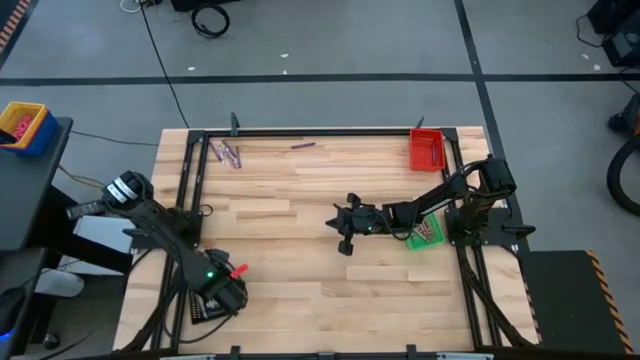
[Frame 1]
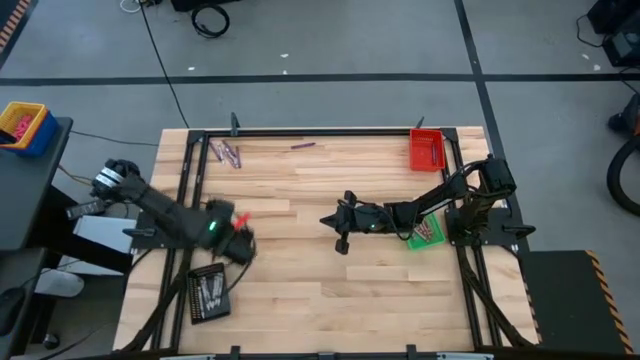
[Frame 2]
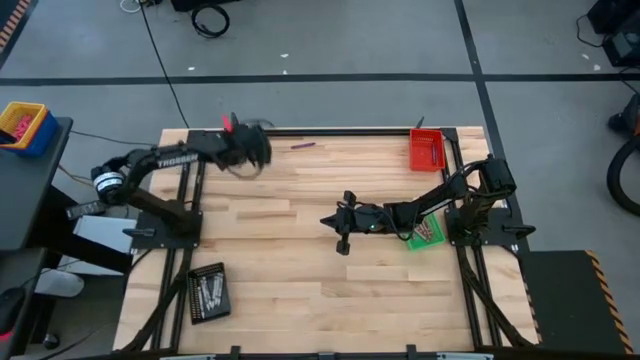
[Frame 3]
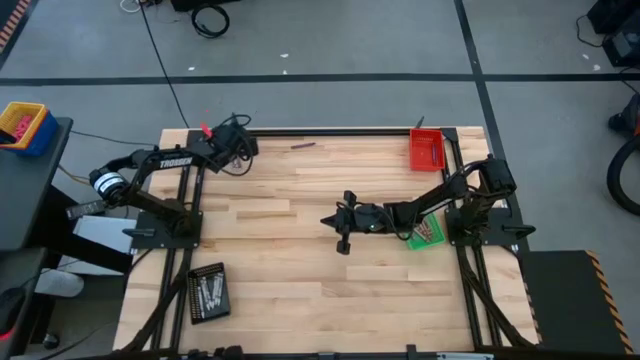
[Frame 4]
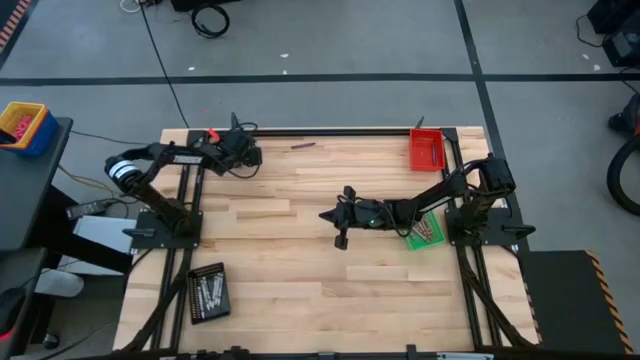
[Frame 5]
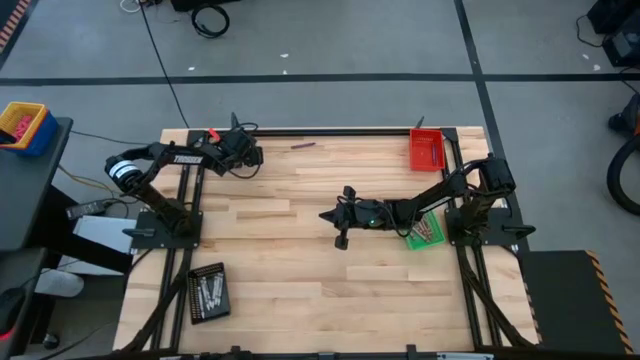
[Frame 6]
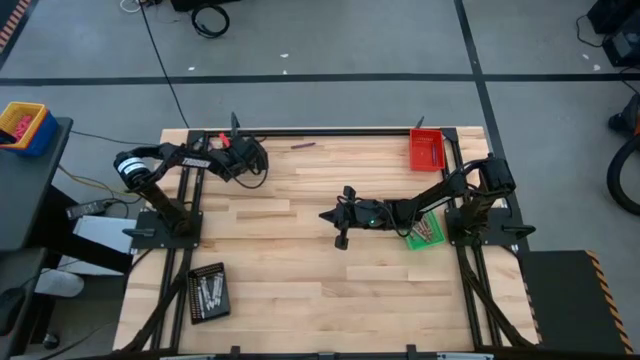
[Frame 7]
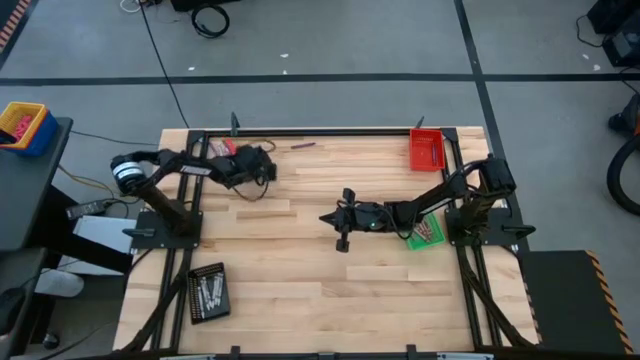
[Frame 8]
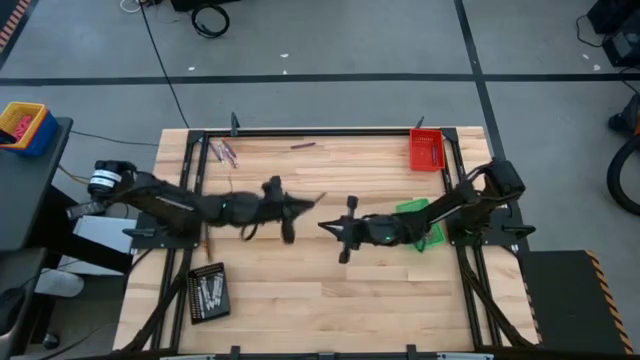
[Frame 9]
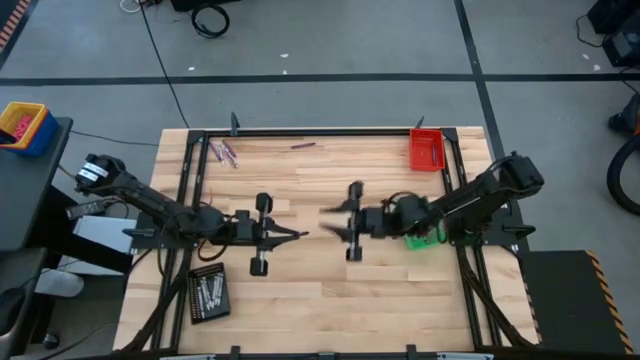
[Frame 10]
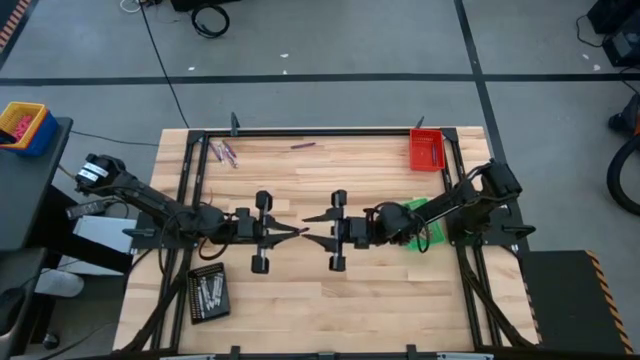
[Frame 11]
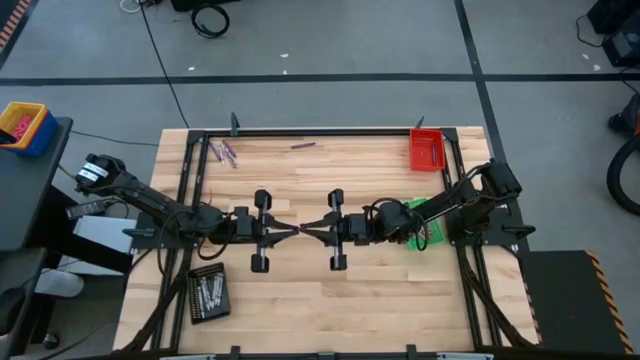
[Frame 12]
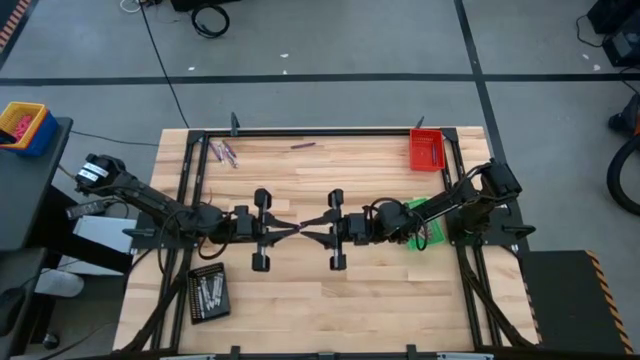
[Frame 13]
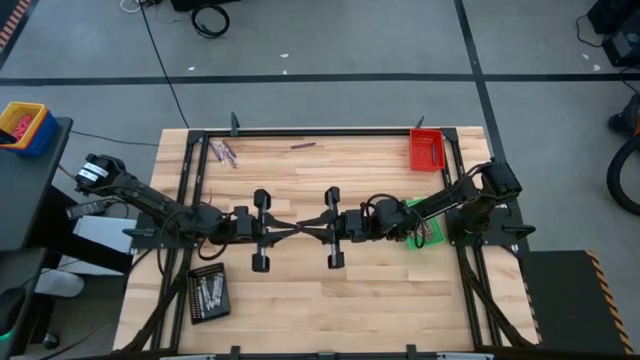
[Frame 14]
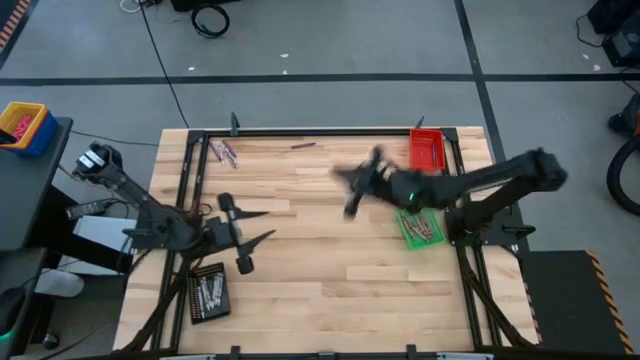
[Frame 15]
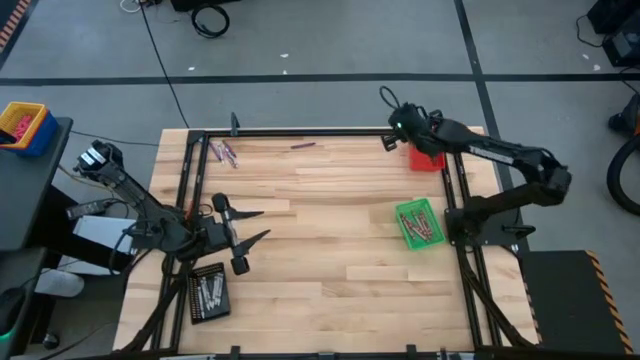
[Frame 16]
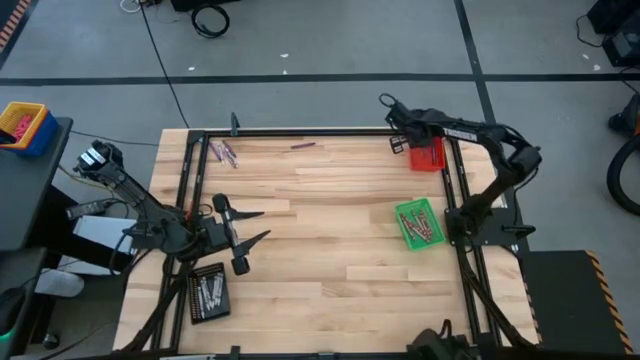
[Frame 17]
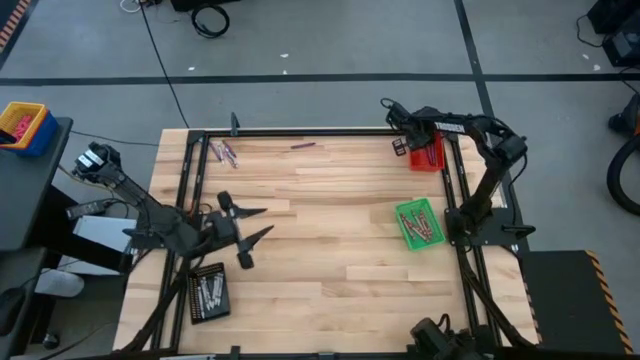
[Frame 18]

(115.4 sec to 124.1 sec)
Task: Sort crayons
Put the purple crayon into the red bin

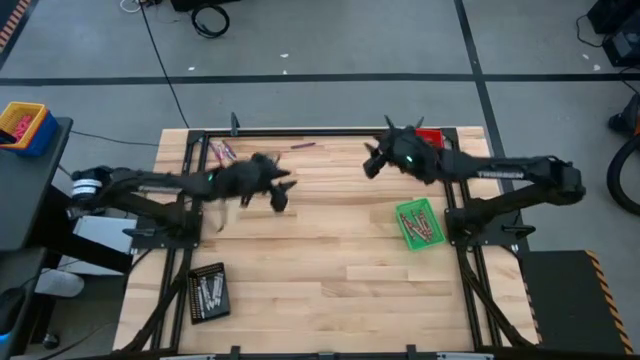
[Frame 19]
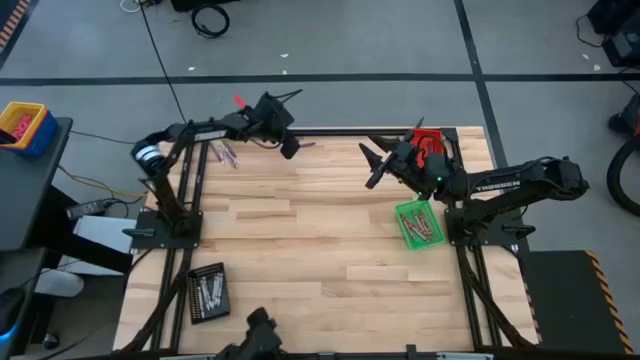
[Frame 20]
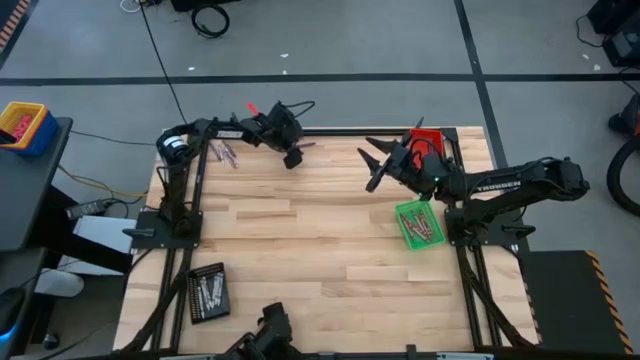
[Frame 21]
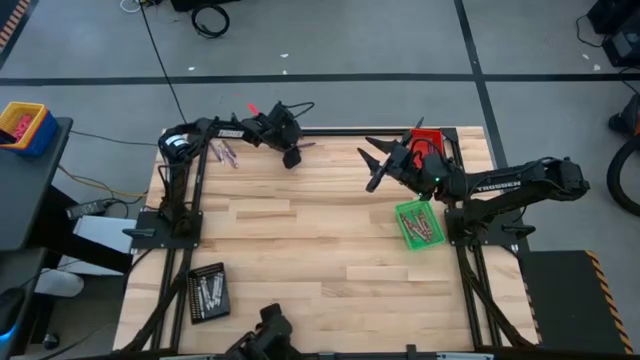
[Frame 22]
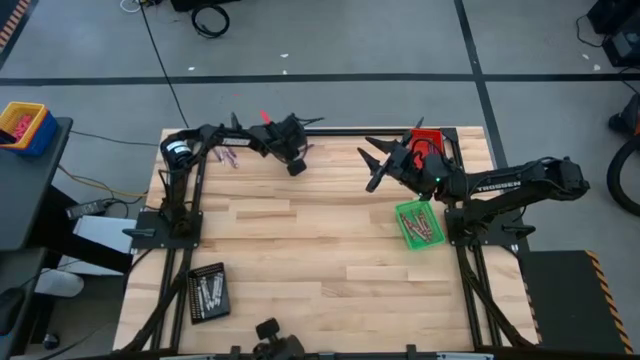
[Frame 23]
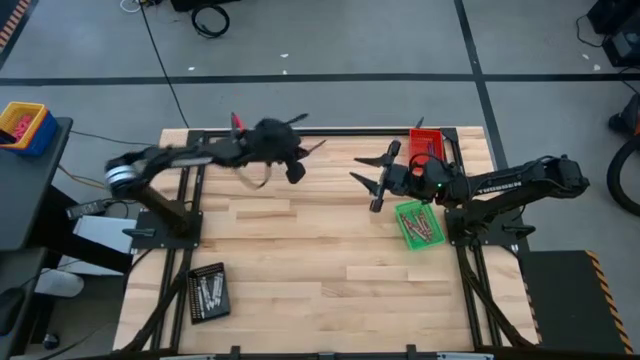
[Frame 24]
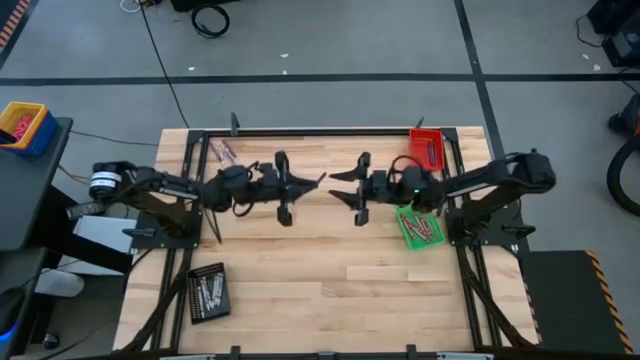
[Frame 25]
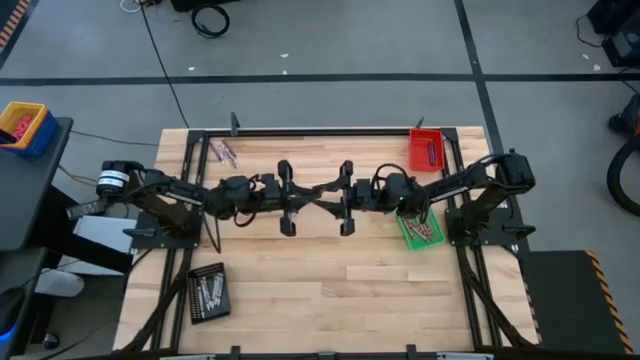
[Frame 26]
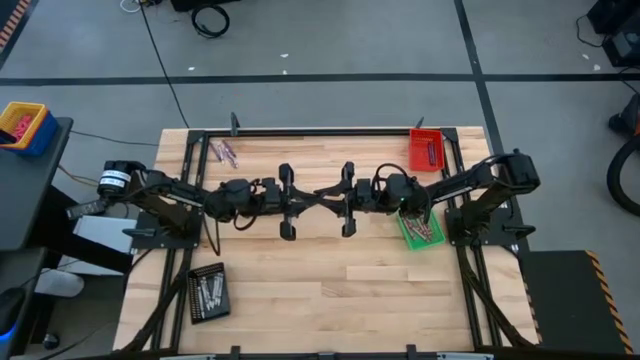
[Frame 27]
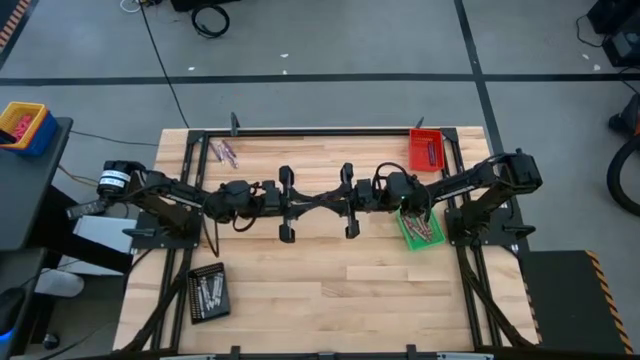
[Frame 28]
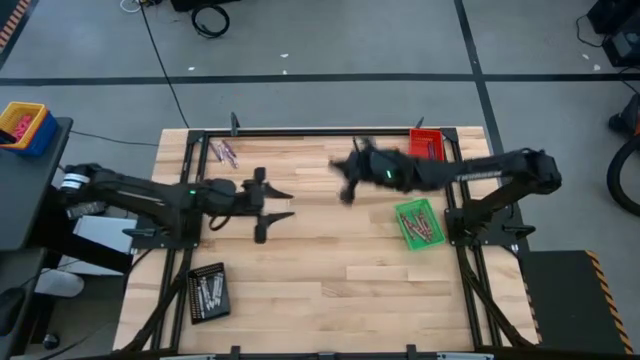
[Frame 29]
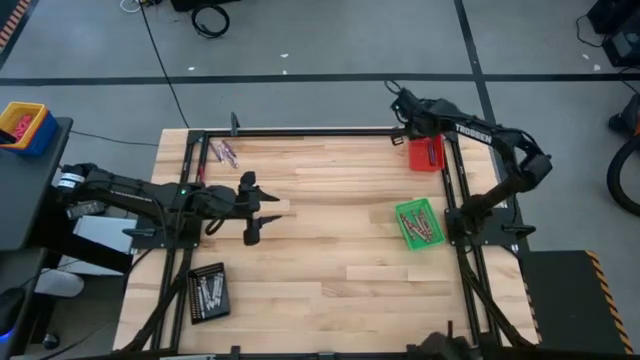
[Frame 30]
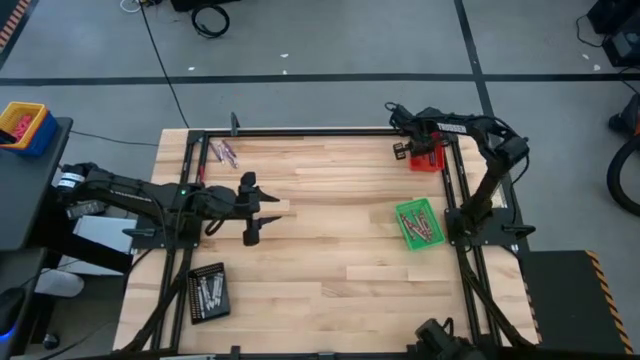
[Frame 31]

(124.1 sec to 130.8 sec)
Put the purple crayon into the red bin

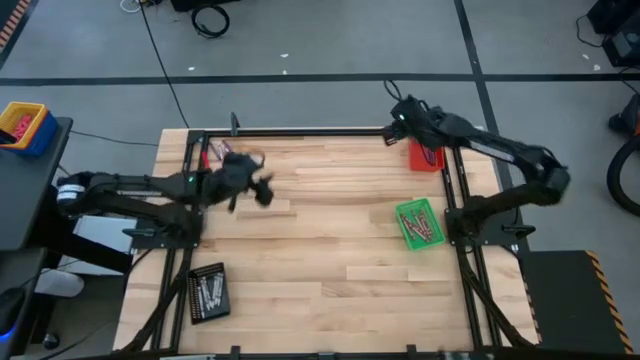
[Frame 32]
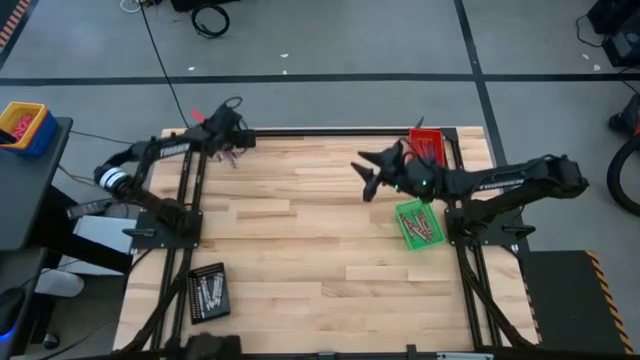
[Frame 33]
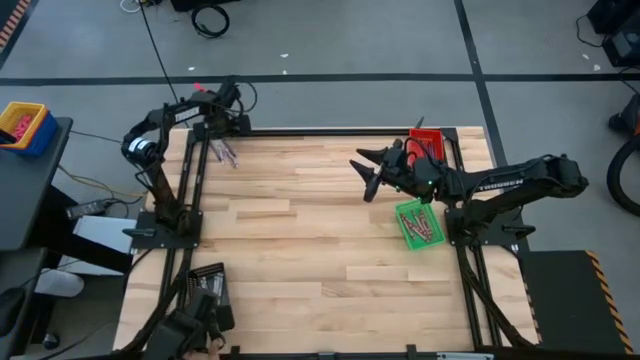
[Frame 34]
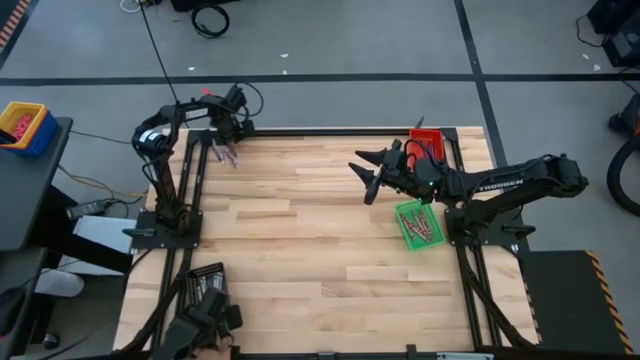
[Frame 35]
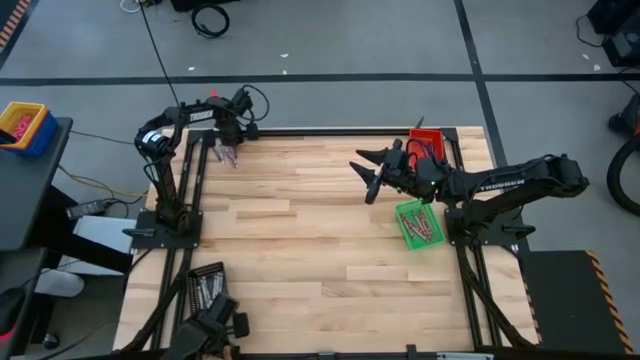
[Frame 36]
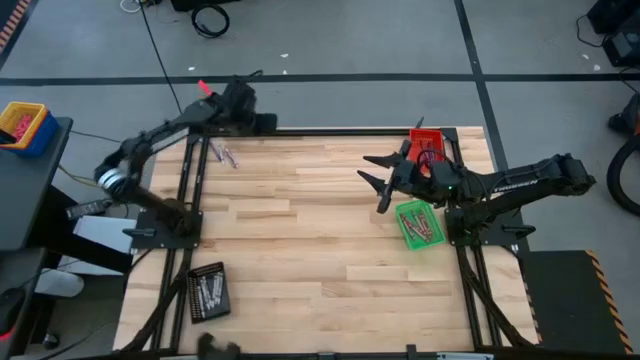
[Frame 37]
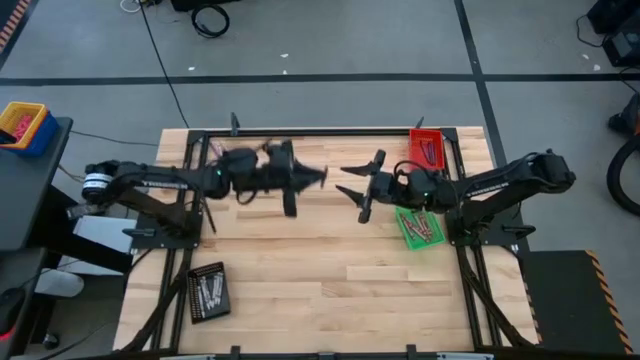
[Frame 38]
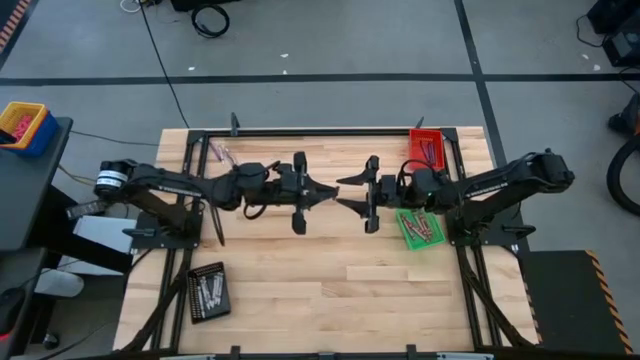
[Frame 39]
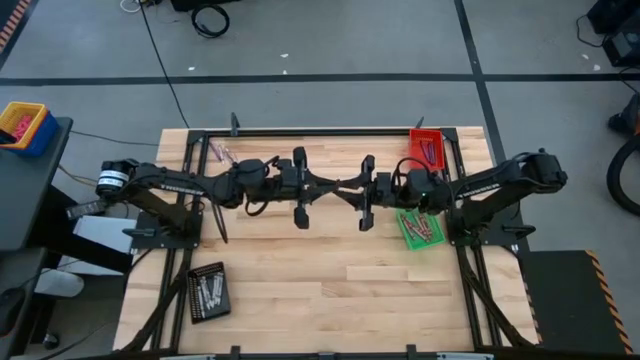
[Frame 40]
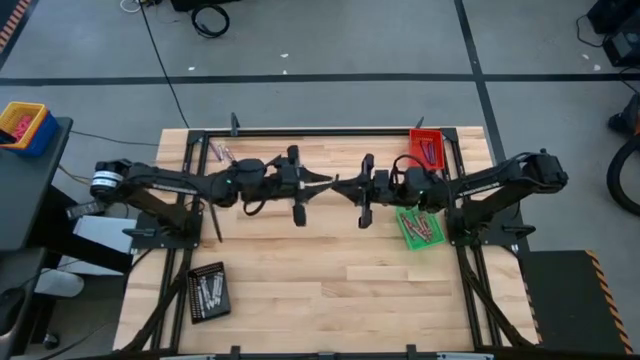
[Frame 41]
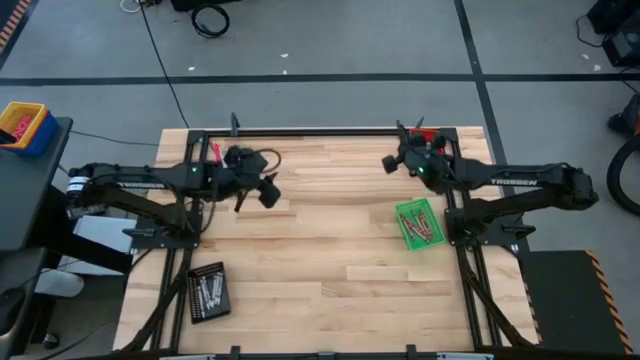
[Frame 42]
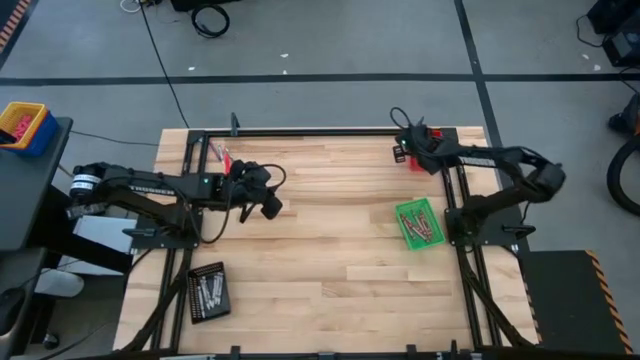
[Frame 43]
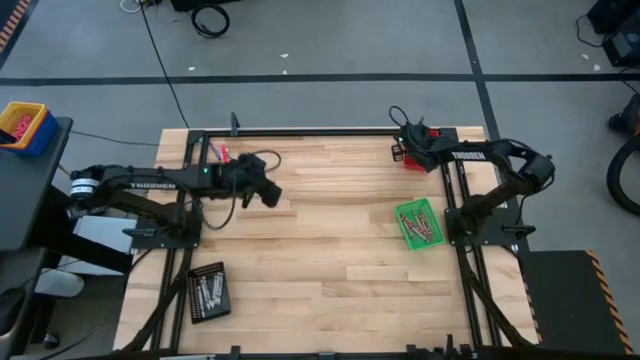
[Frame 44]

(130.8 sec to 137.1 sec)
Put the purple crayon into the red bin
